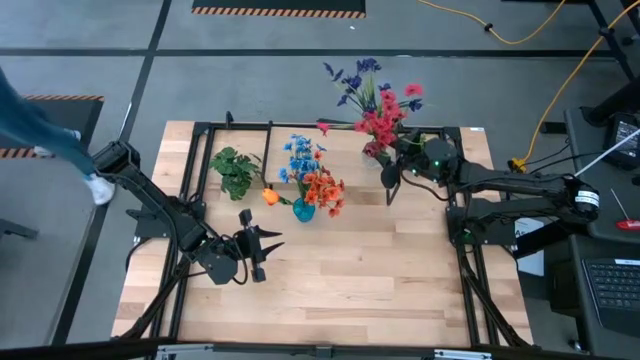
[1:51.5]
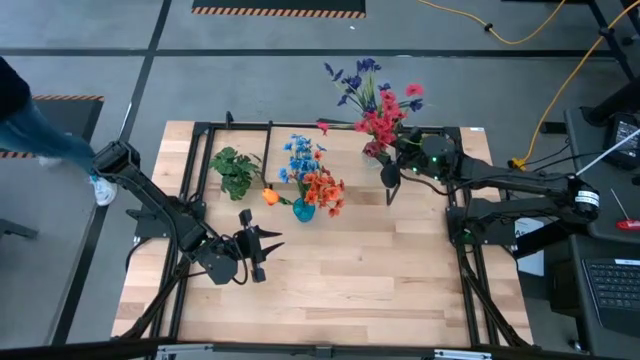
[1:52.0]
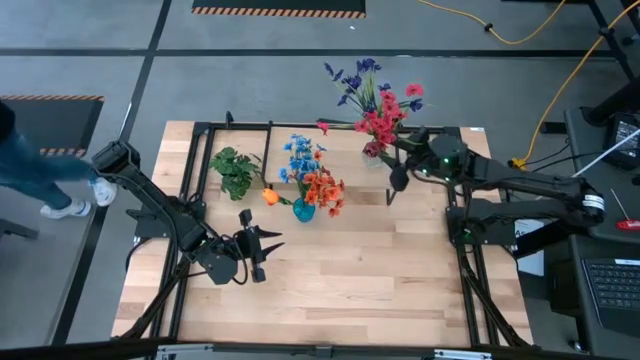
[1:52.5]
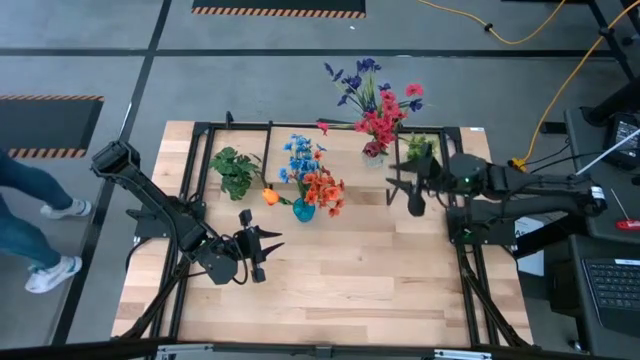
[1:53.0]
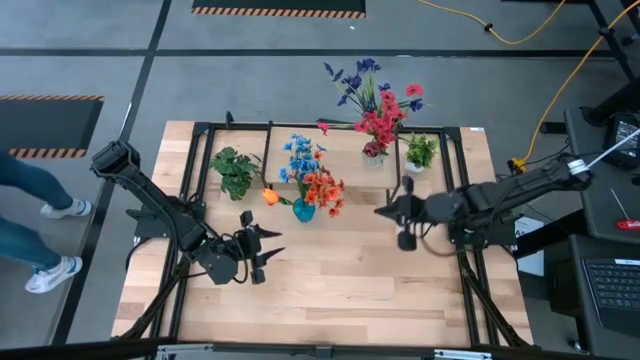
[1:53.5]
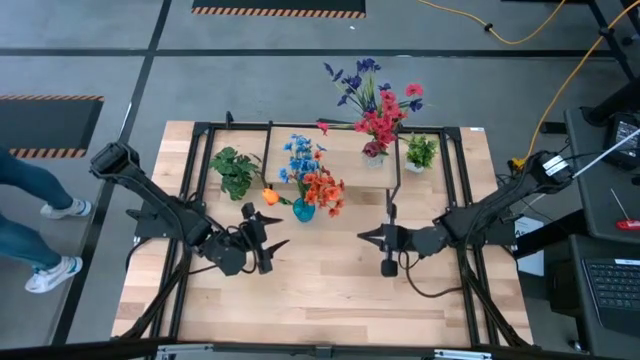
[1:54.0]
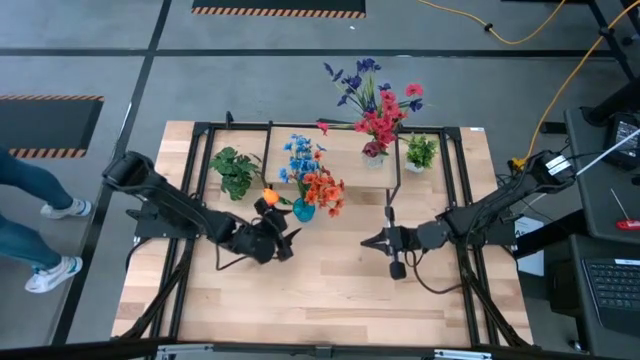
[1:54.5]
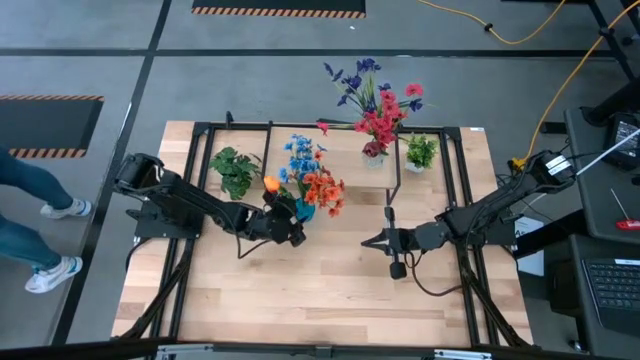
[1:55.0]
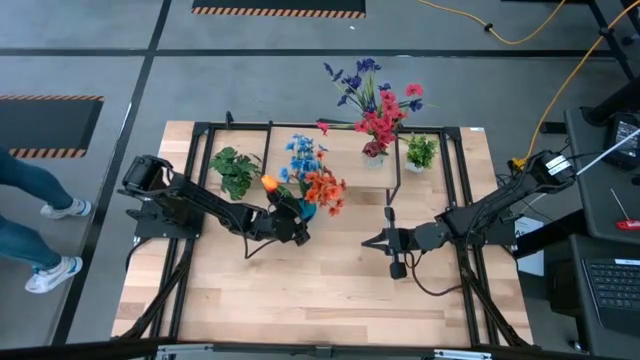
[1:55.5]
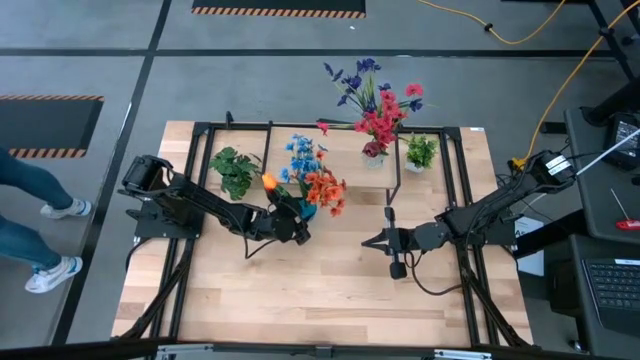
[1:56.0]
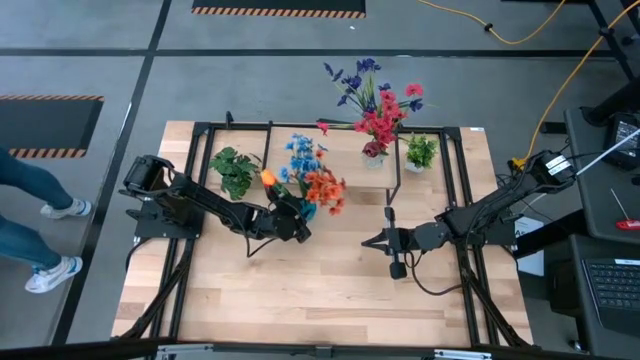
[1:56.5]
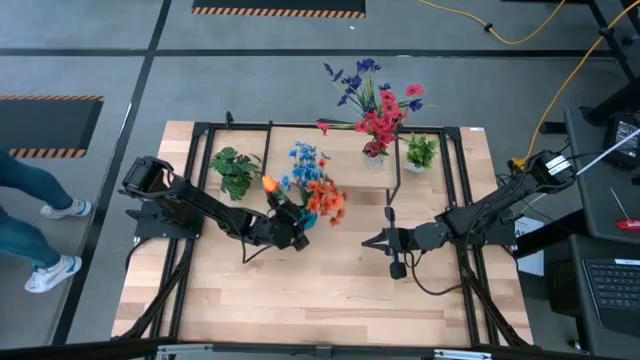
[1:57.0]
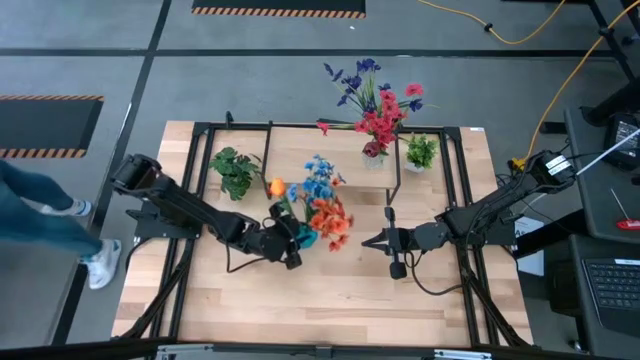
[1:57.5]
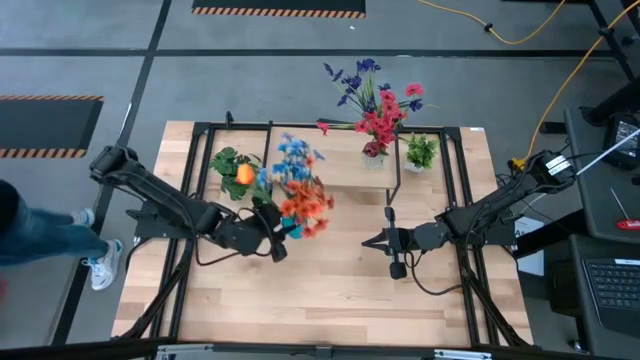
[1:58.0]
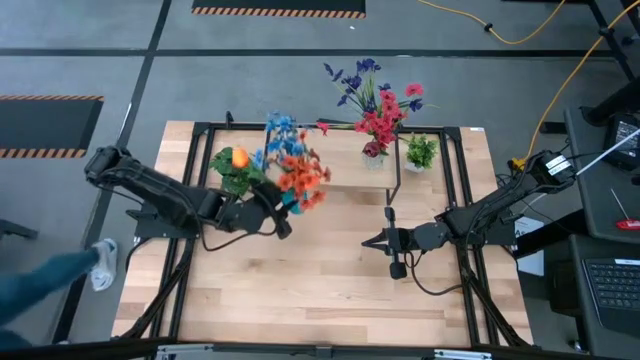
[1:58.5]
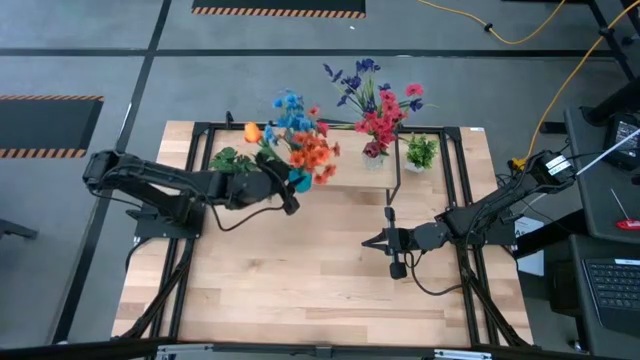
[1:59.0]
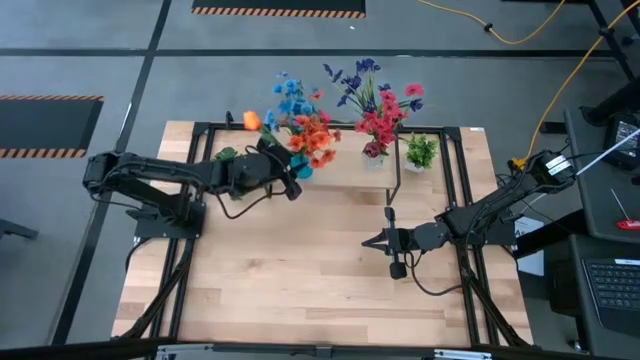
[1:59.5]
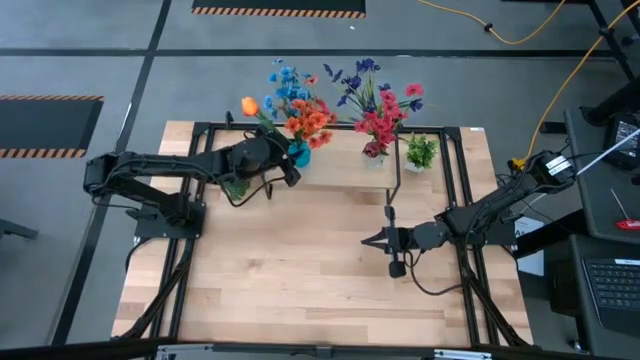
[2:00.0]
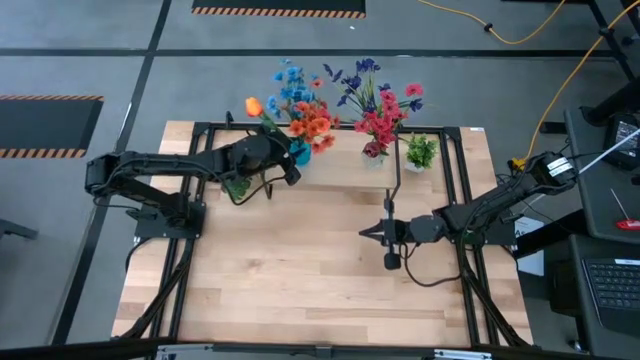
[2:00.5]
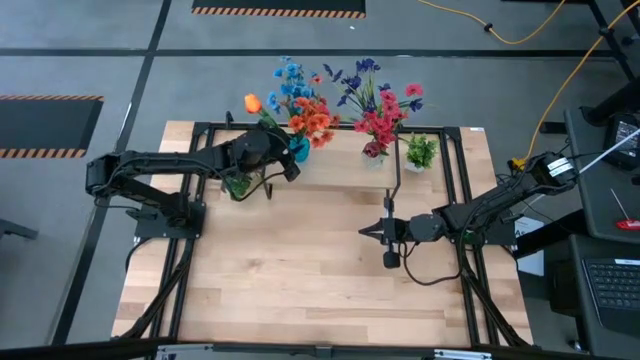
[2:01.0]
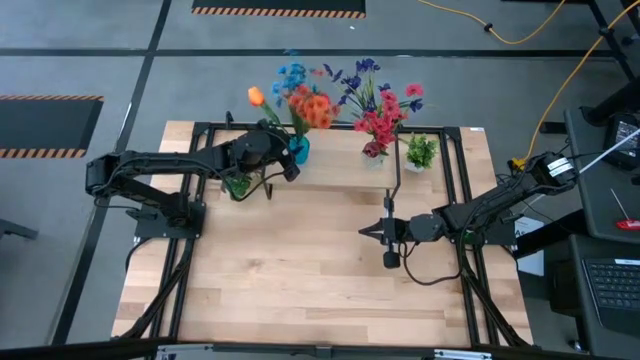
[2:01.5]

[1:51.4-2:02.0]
Task: Pick and place flowers into a vace then onto a shelf
Put the blue vase on the shelf

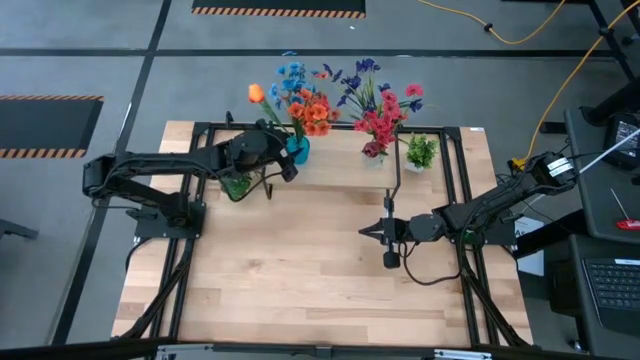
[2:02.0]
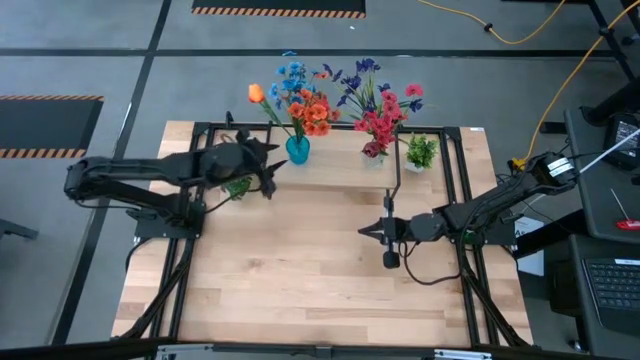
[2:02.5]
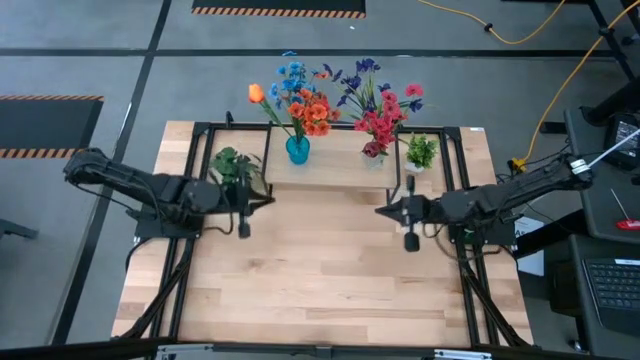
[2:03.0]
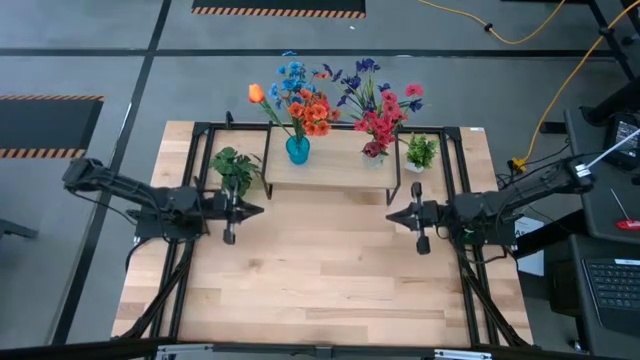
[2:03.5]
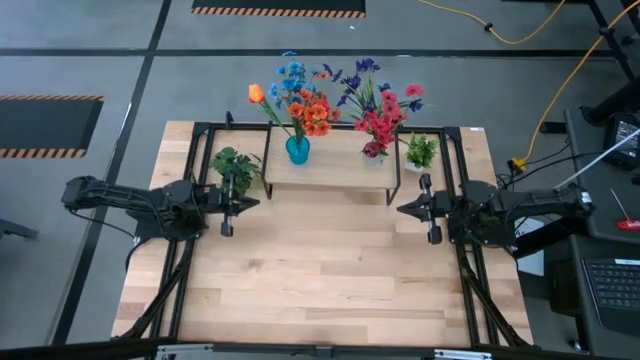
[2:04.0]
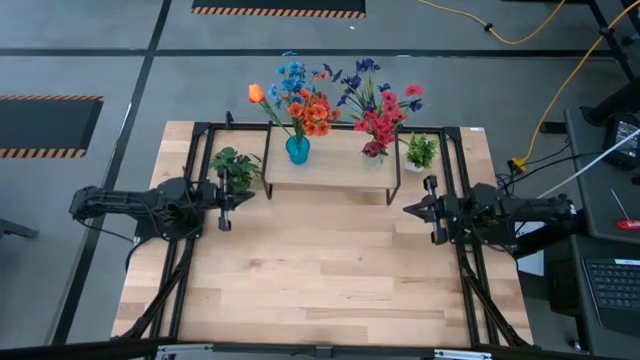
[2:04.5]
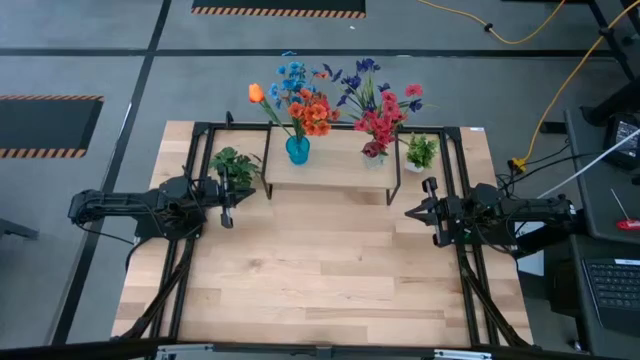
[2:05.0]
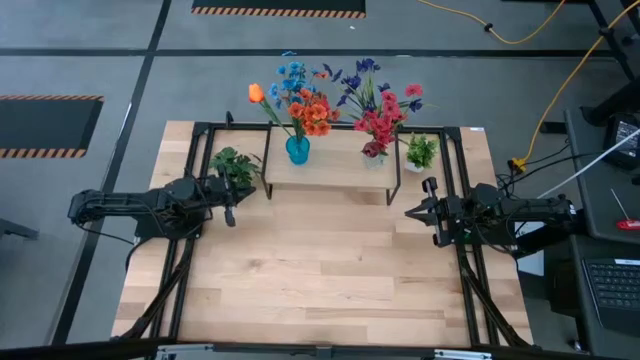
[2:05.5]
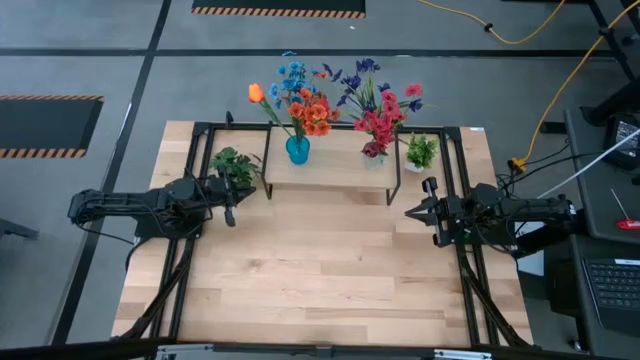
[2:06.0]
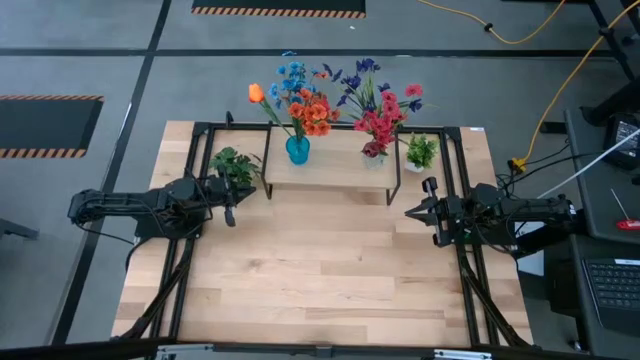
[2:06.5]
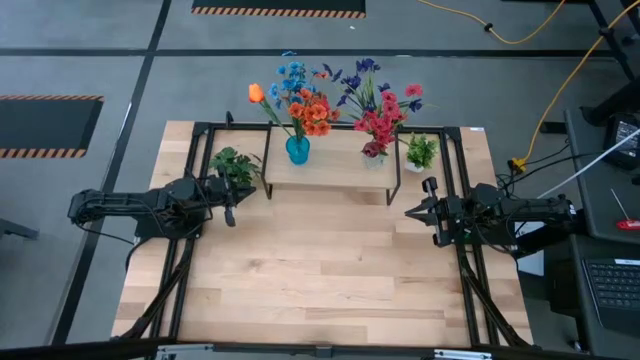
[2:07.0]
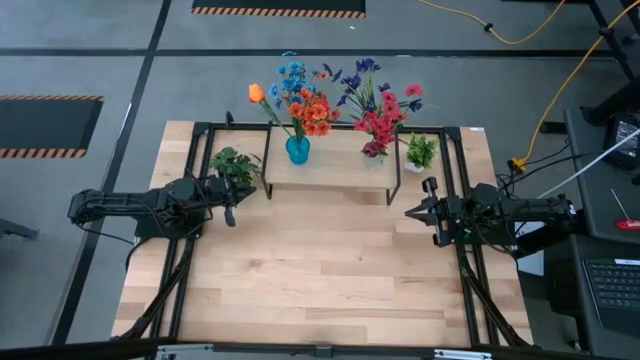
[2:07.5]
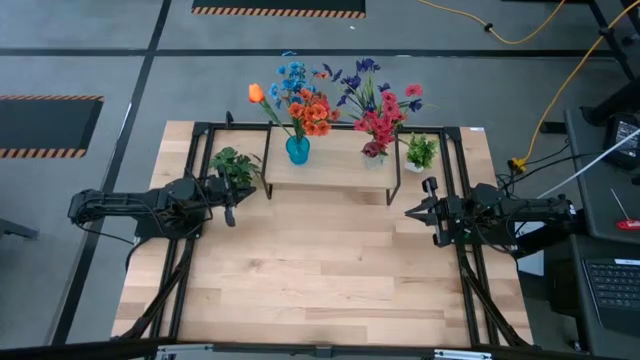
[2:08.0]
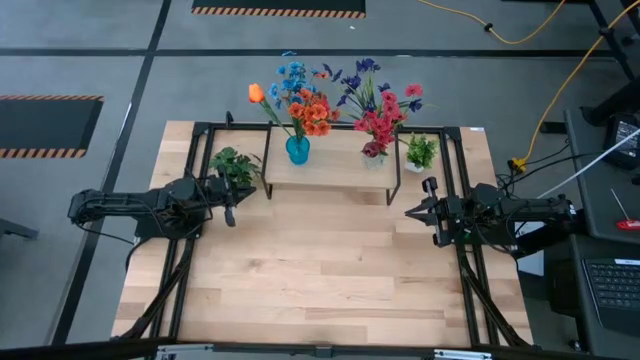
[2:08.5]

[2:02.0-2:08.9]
Return to Home Position

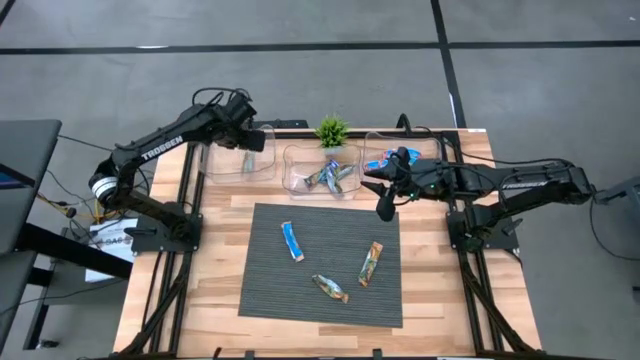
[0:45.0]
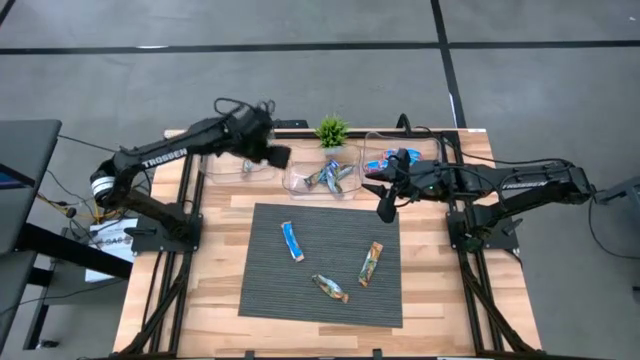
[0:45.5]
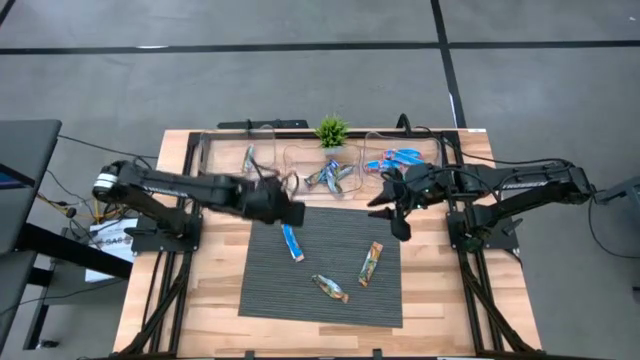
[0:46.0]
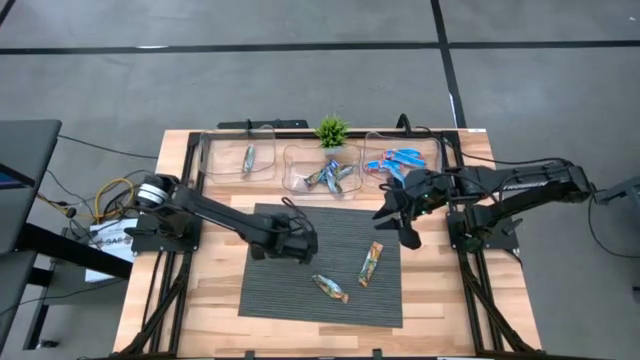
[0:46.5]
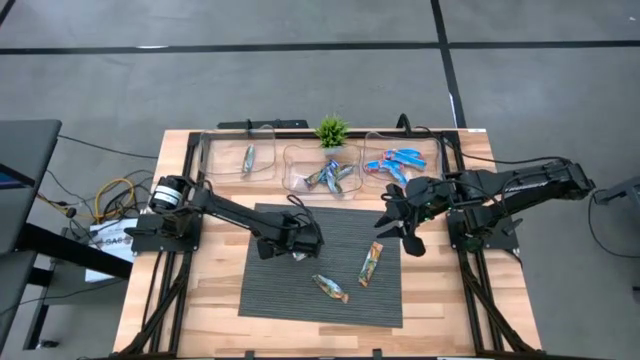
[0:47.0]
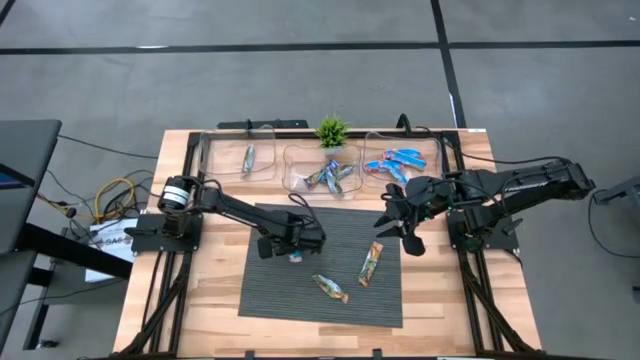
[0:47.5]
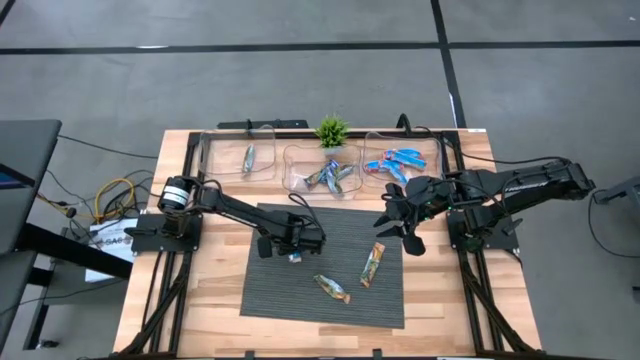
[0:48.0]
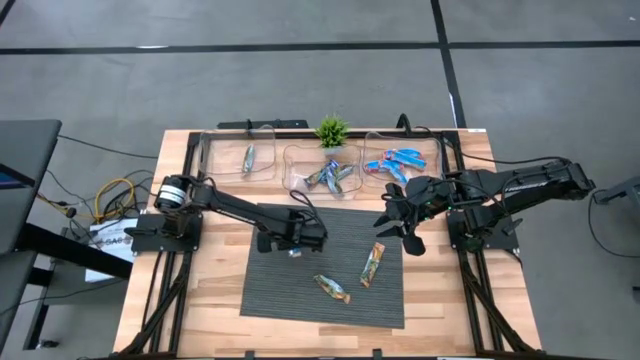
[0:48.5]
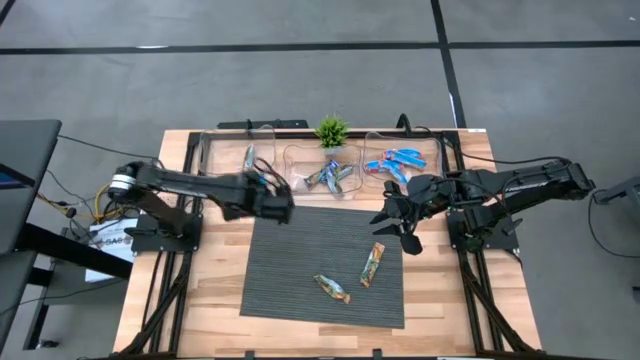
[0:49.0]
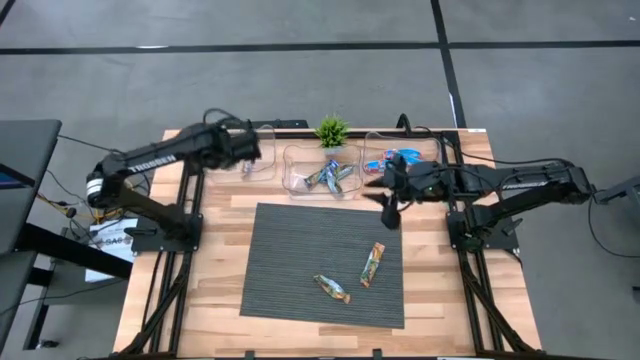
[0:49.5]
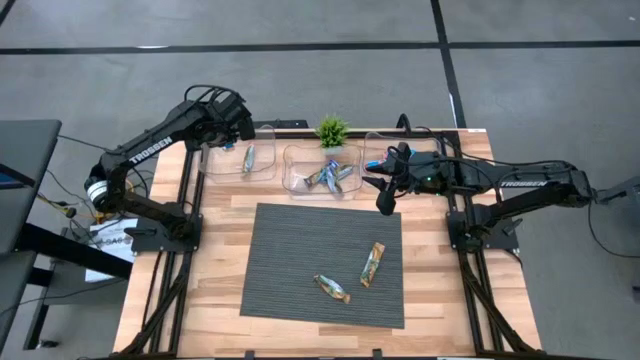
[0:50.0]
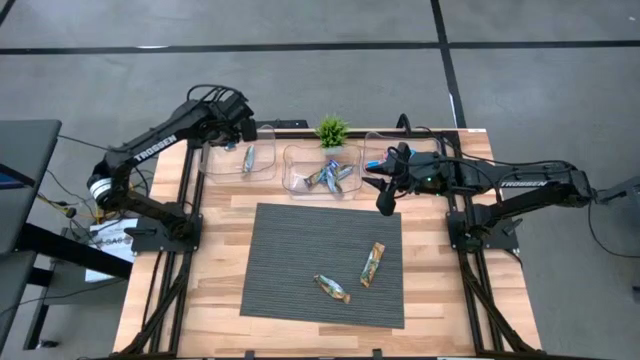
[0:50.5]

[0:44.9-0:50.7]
Task: Pick and place Granola Bars by type
Put the yellow granola bar into the left transparent bin
